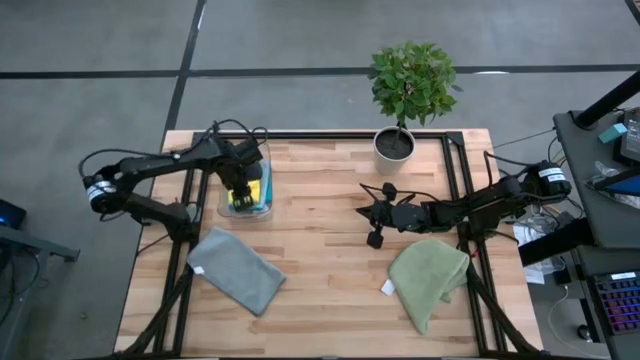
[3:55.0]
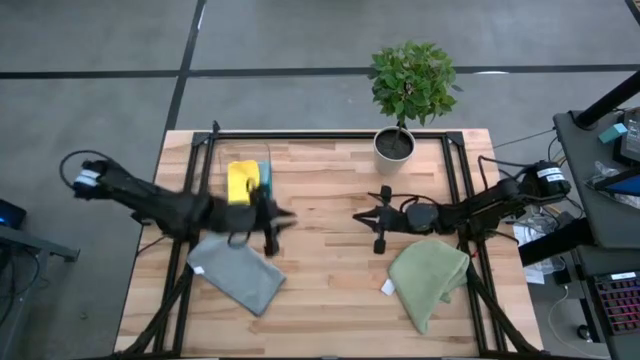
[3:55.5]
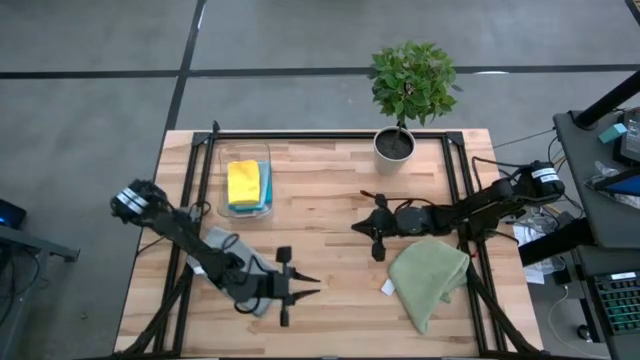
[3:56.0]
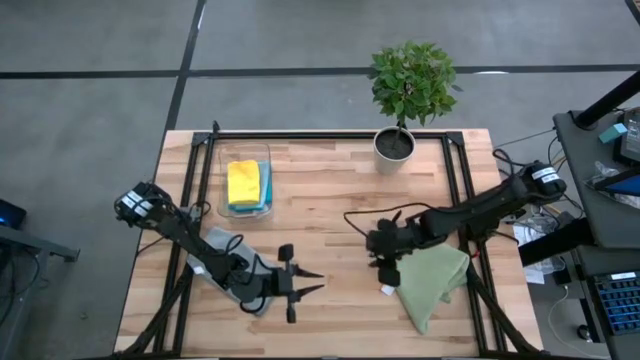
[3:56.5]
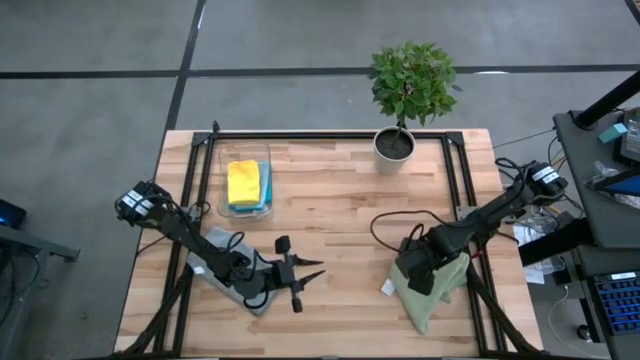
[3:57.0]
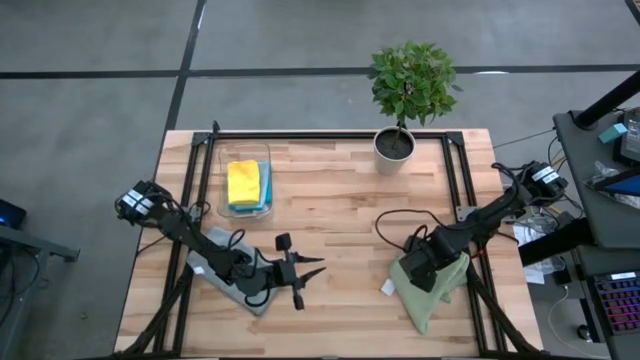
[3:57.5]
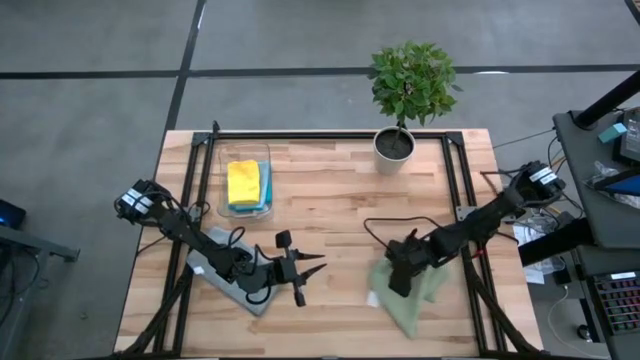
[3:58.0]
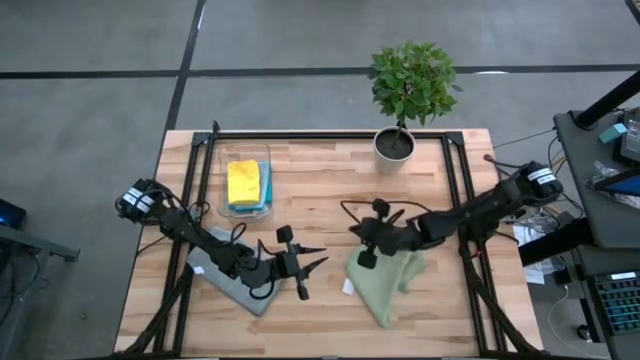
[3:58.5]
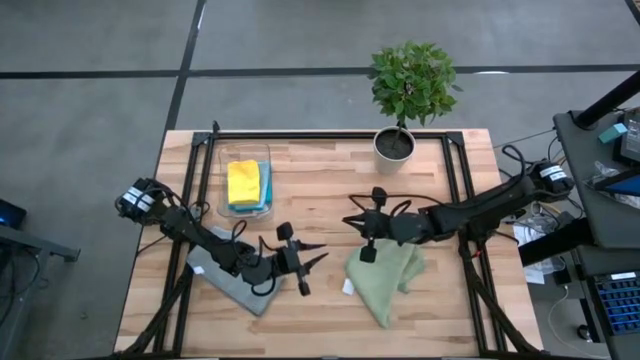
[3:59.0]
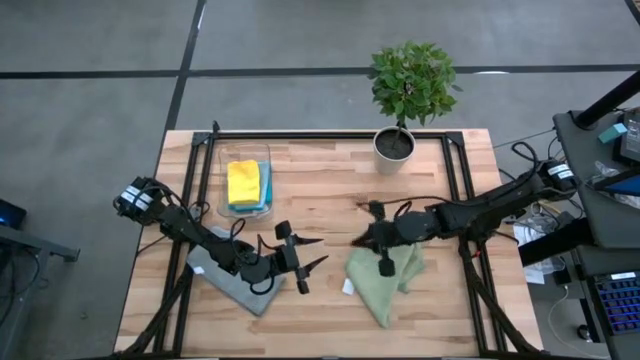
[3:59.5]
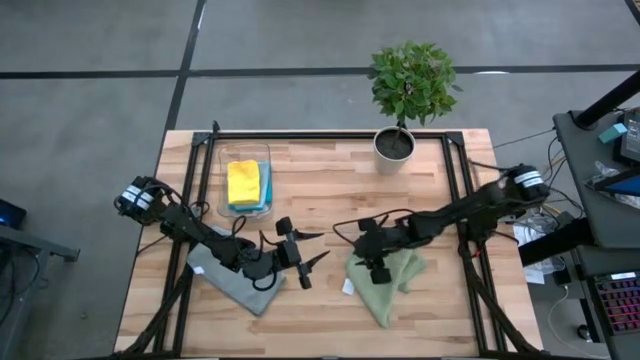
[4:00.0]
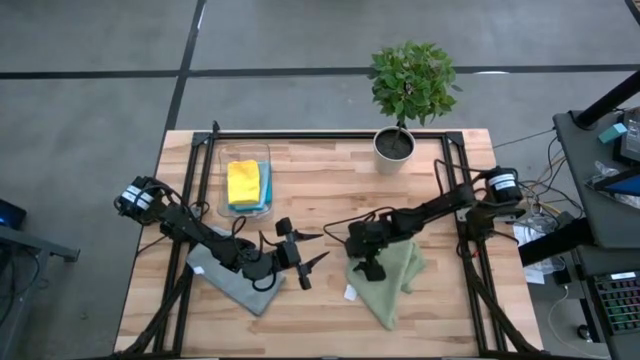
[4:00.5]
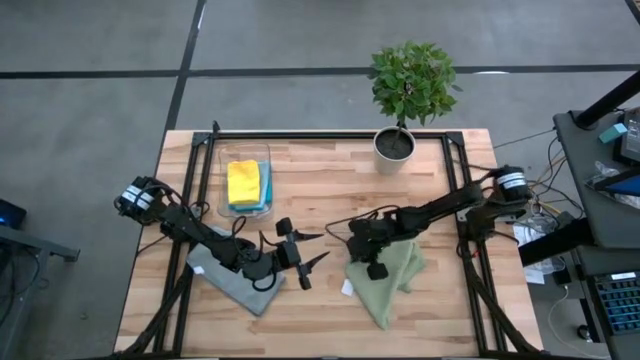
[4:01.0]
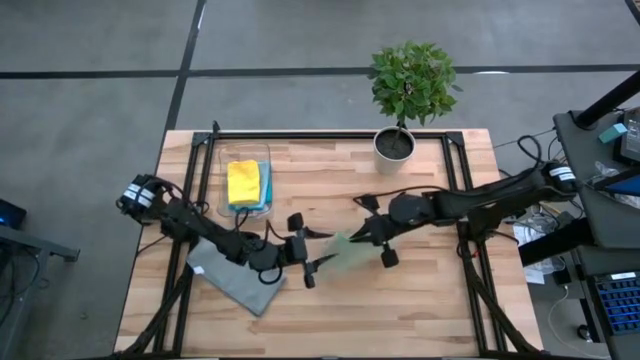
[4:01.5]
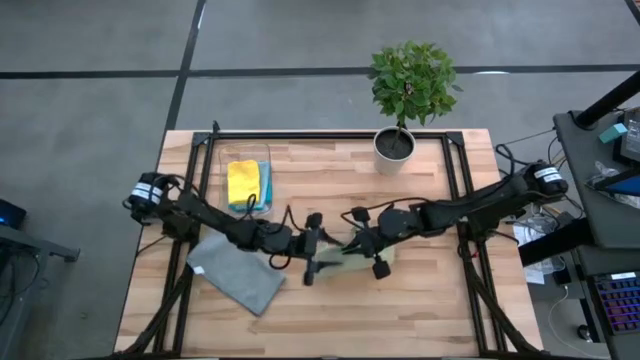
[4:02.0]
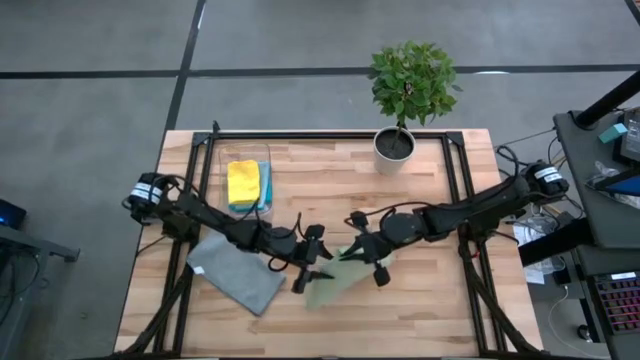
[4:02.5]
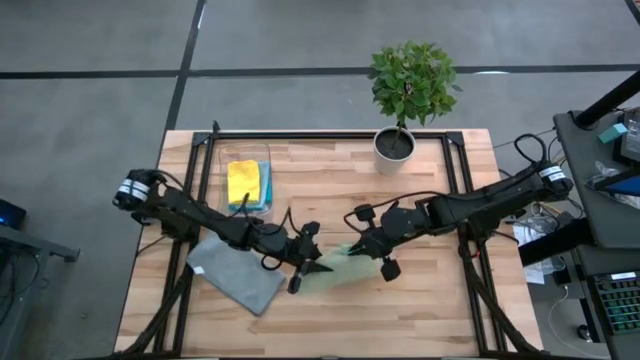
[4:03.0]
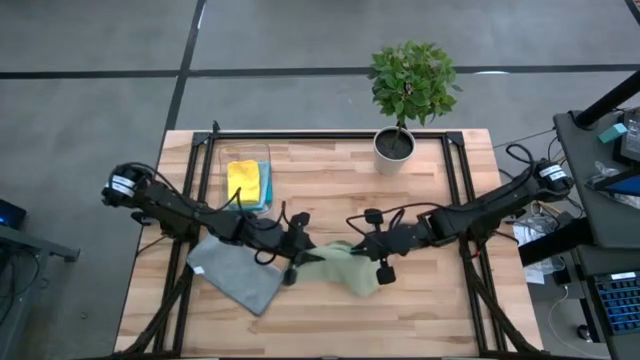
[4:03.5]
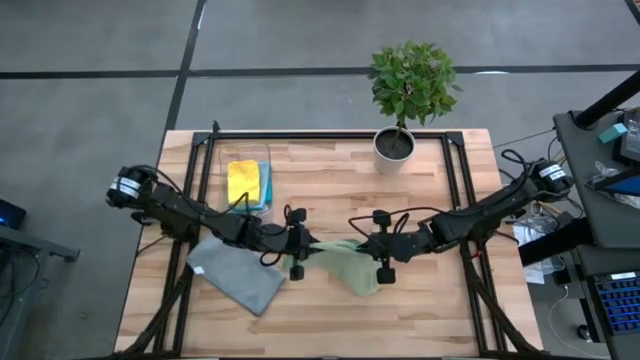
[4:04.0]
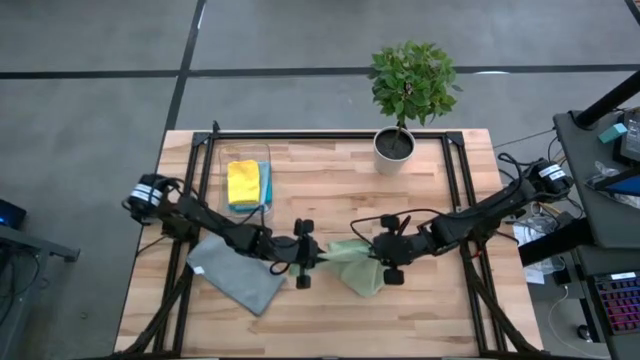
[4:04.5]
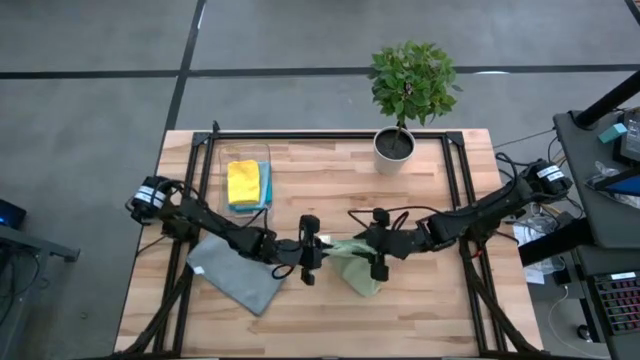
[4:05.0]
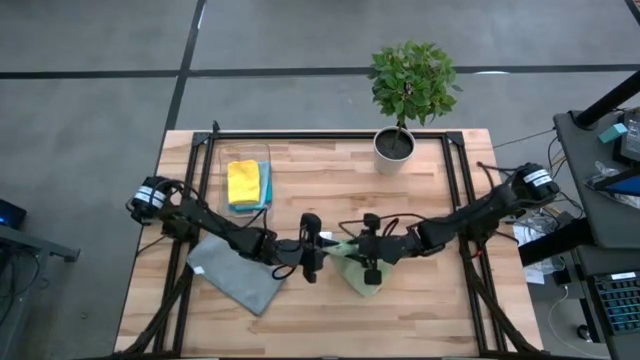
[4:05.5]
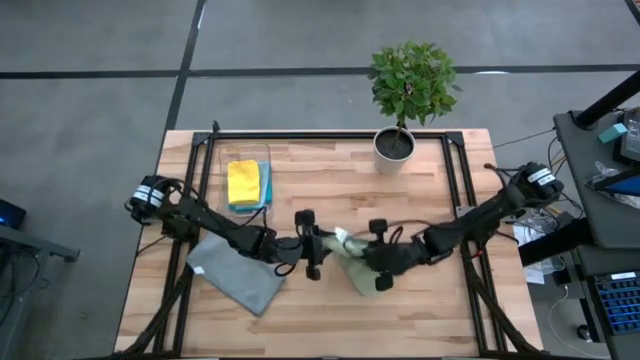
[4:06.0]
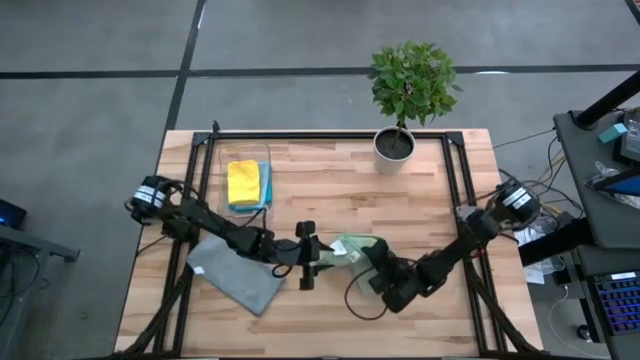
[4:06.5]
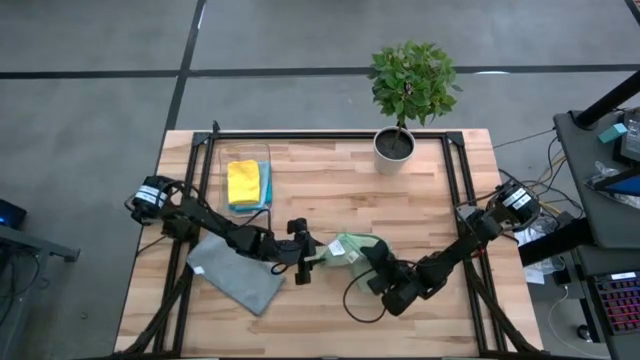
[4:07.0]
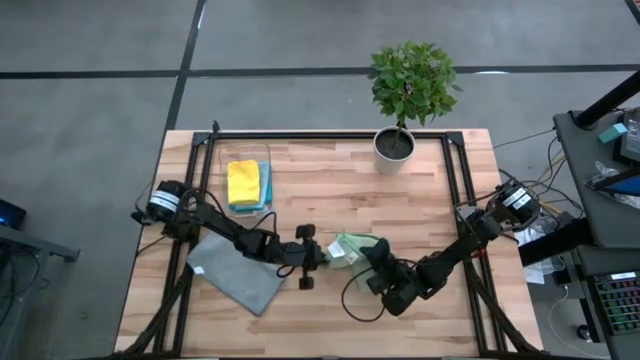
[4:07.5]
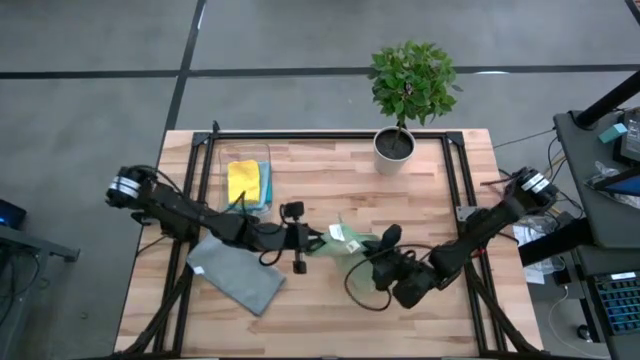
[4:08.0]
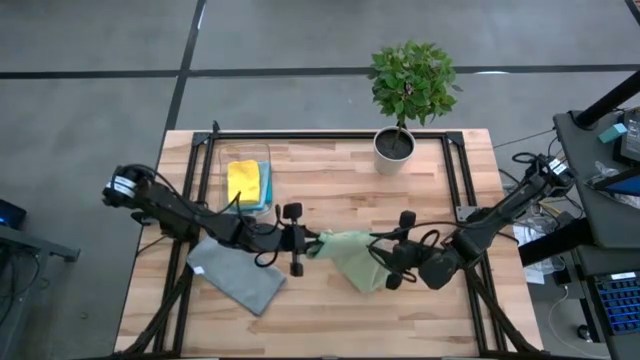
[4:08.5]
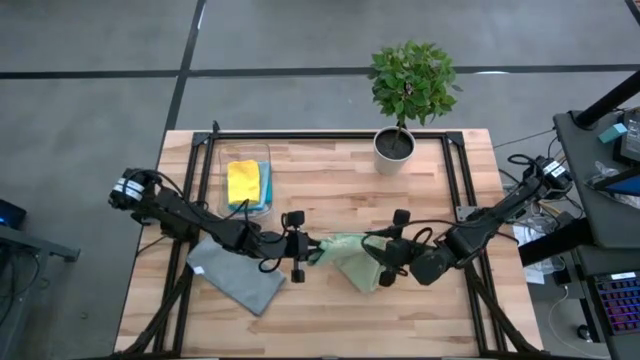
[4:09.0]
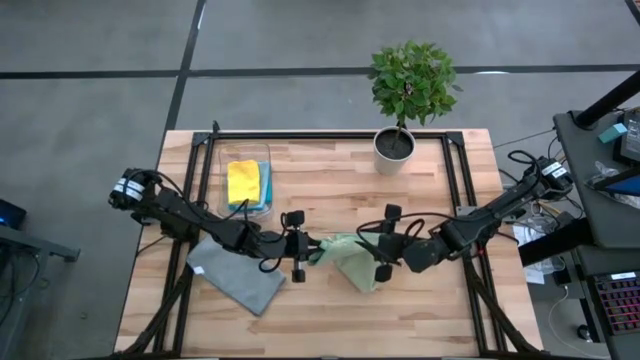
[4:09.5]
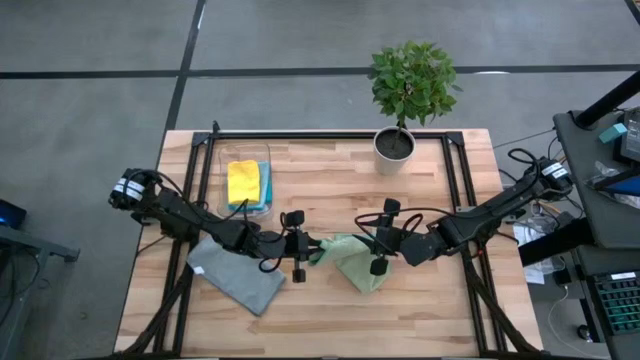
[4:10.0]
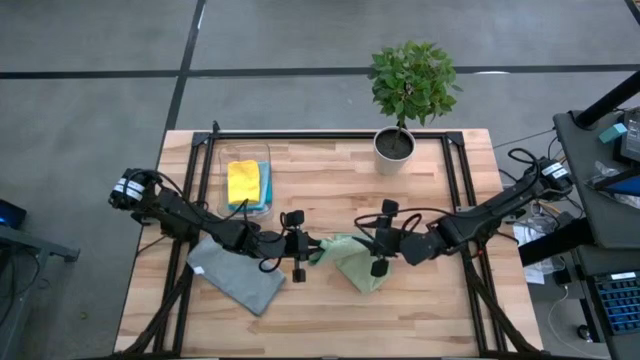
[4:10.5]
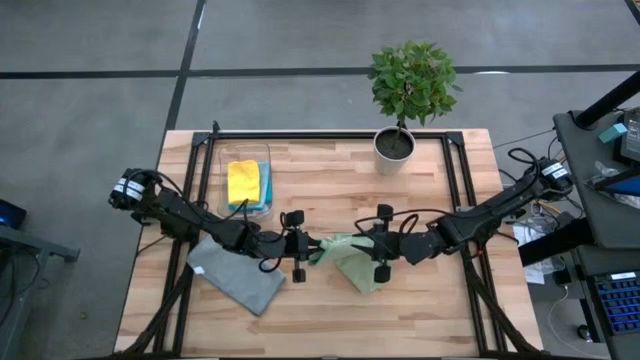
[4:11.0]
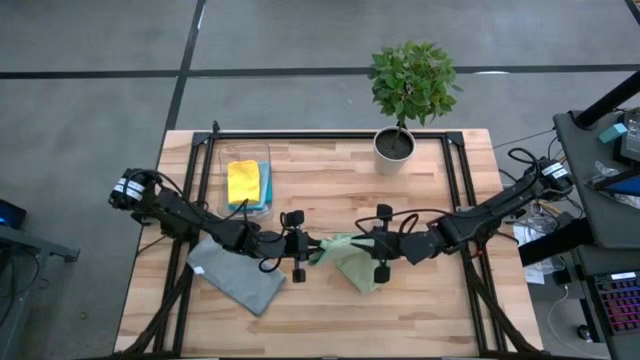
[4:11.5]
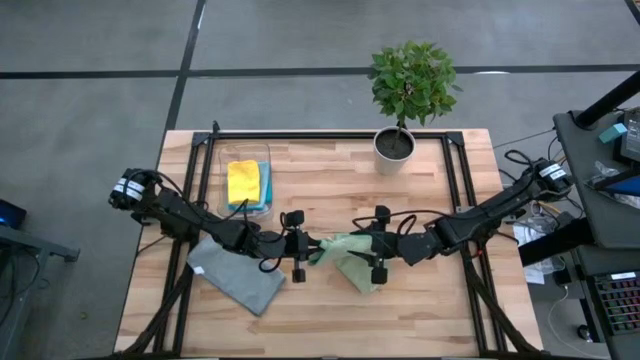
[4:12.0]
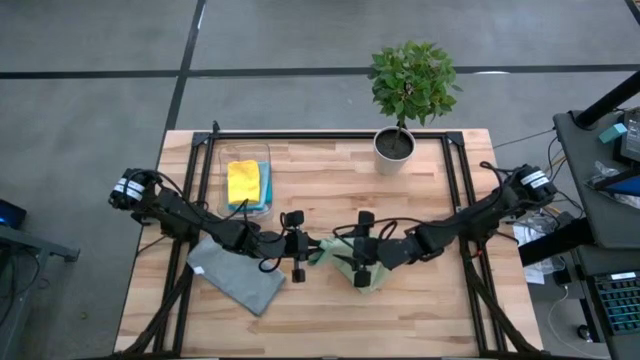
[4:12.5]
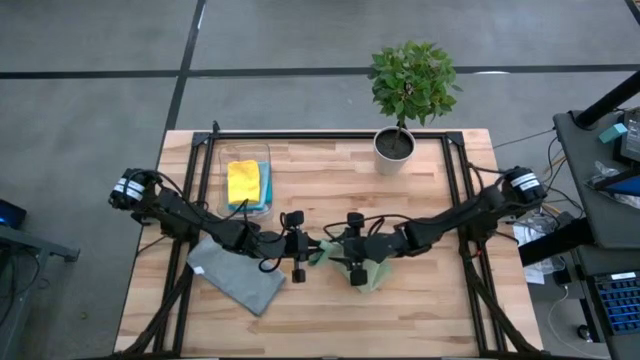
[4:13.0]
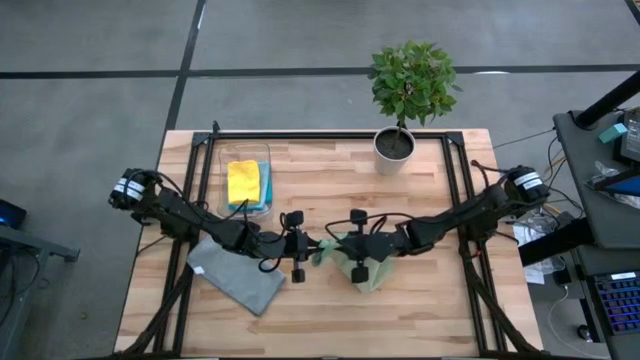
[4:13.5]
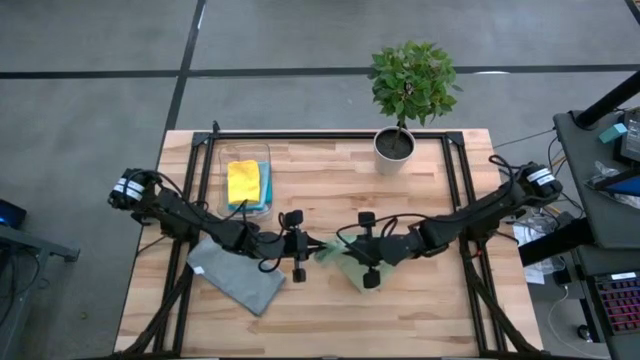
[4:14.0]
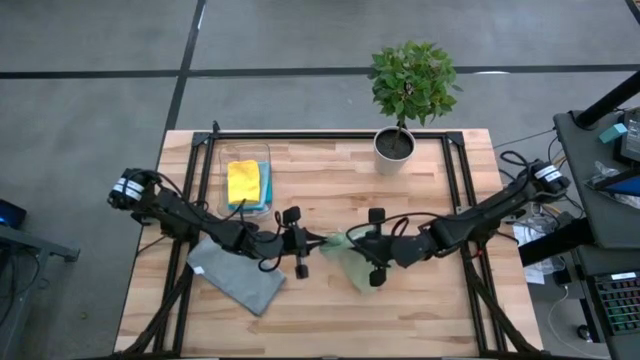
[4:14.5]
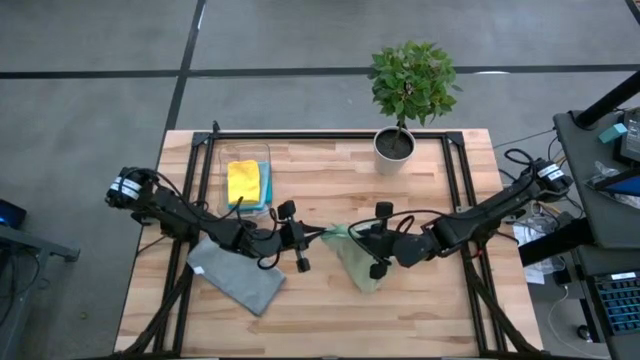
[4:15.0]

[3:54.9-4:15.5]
Task: Fold microfiber towels
Fold the light green microfiber towel

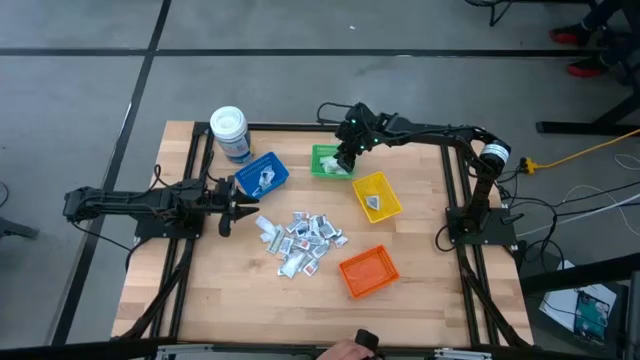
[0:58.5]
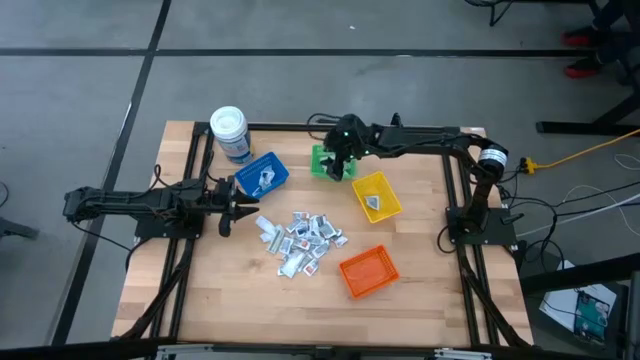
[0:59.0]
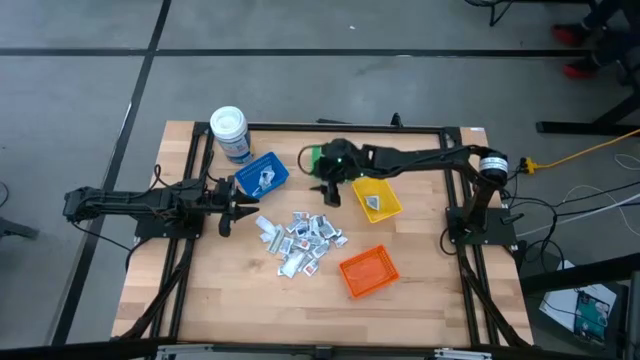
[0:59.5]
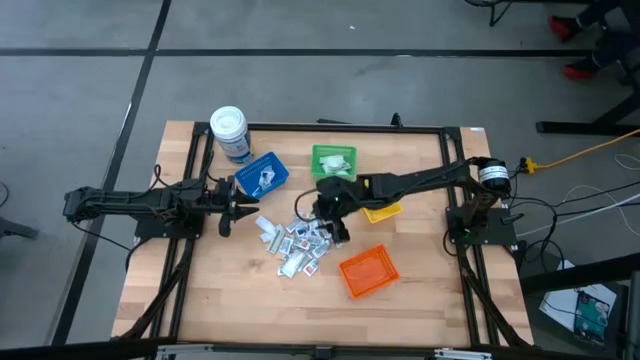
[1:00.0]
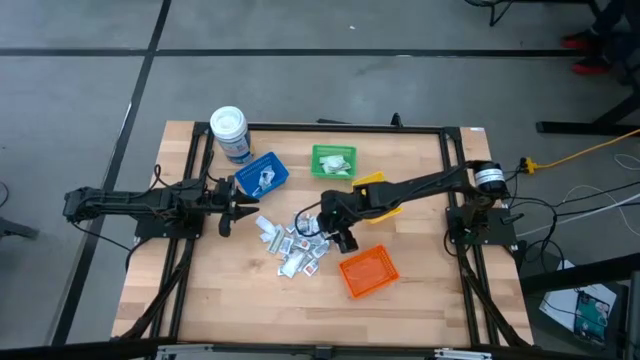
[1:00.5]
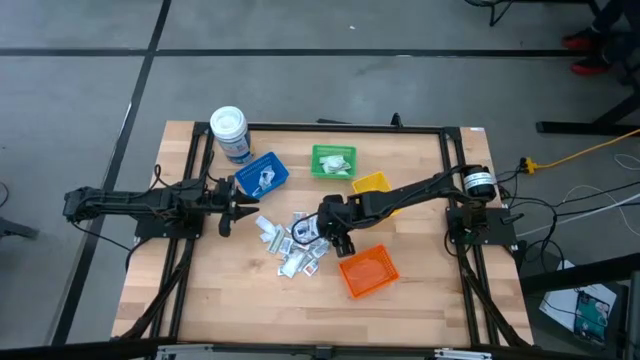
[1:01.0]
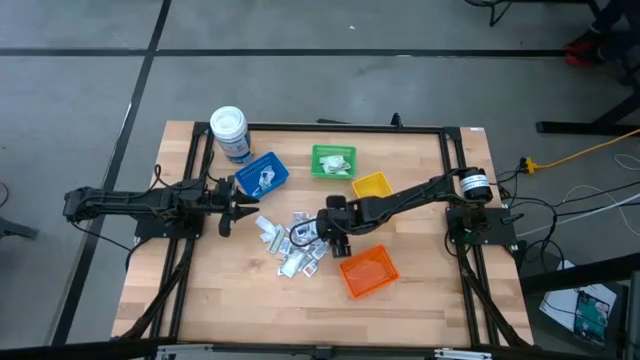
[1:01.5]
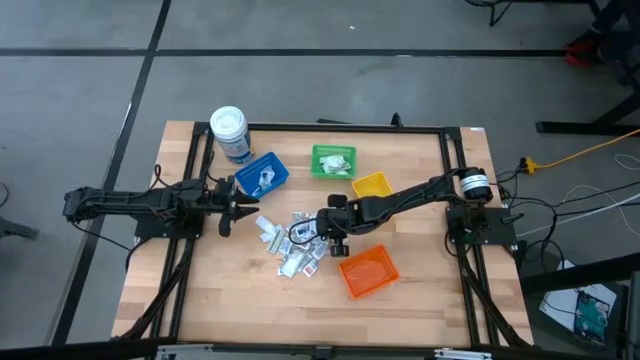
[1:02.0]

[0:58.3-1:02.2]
Task: Pick & Place First Aid Supplies
Put the white towelette pack into the yellow bin
